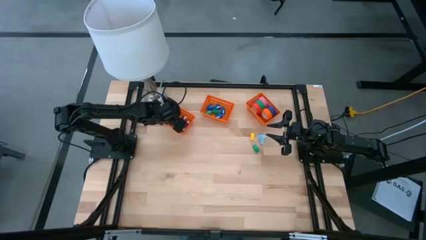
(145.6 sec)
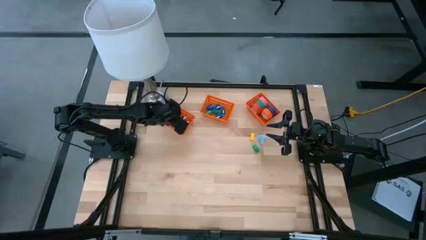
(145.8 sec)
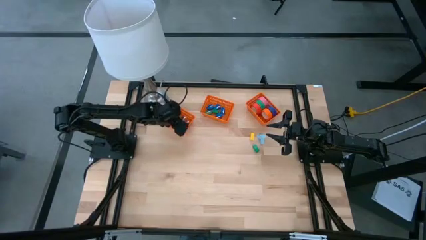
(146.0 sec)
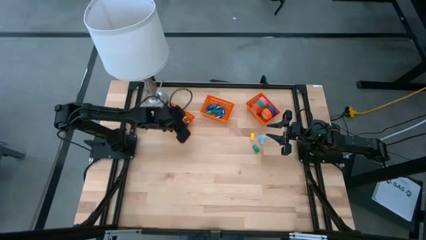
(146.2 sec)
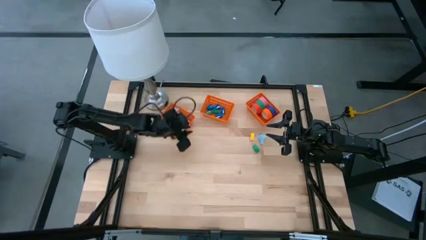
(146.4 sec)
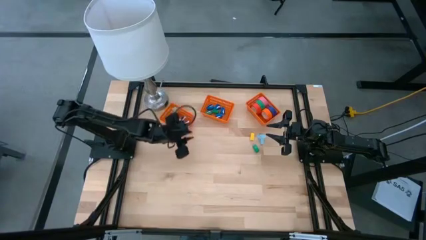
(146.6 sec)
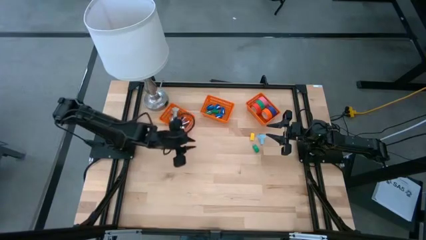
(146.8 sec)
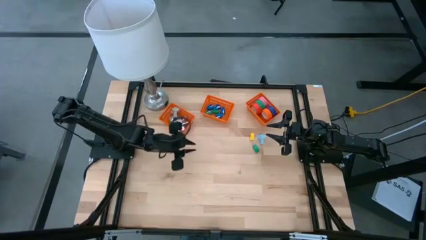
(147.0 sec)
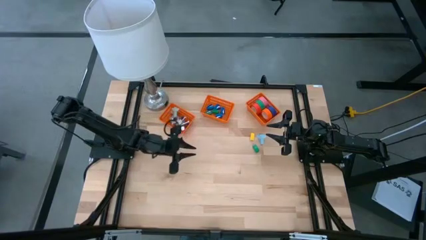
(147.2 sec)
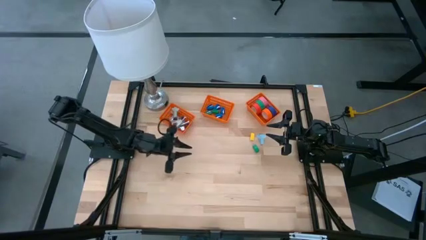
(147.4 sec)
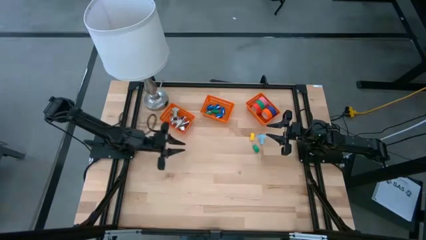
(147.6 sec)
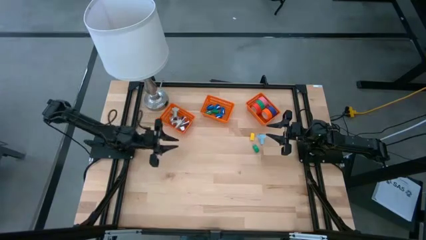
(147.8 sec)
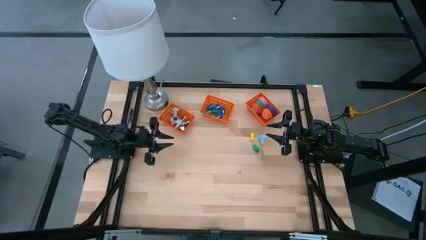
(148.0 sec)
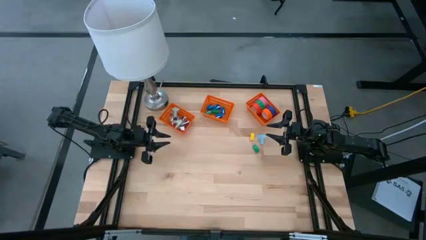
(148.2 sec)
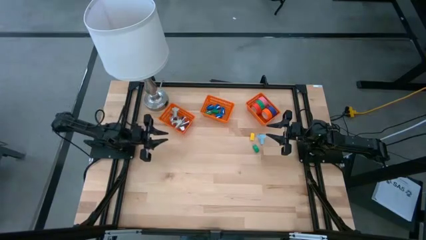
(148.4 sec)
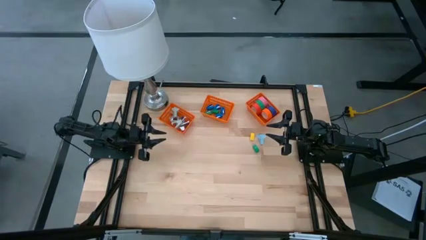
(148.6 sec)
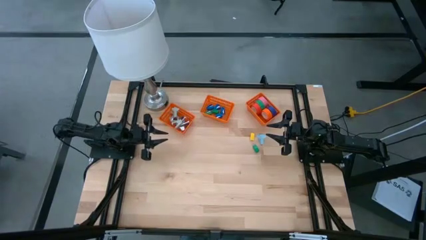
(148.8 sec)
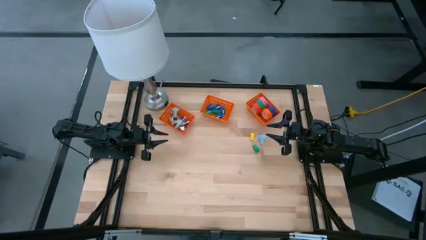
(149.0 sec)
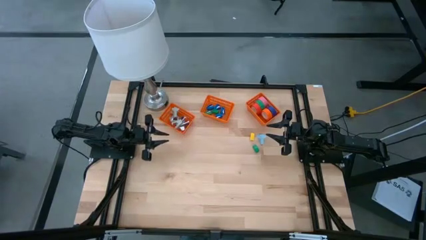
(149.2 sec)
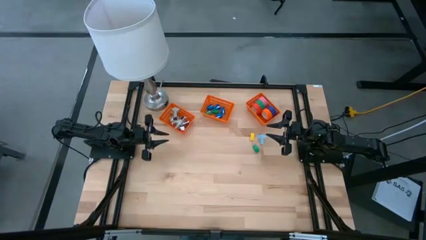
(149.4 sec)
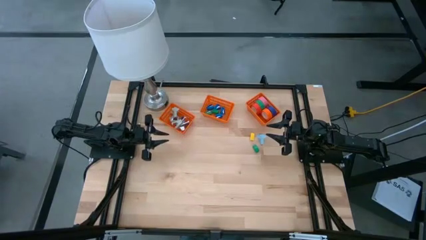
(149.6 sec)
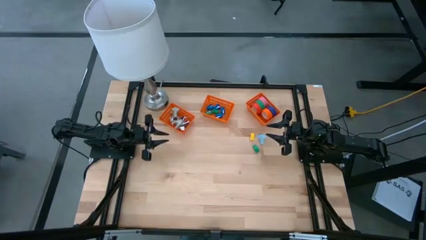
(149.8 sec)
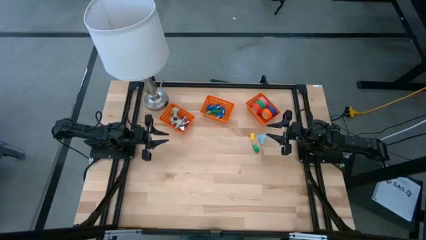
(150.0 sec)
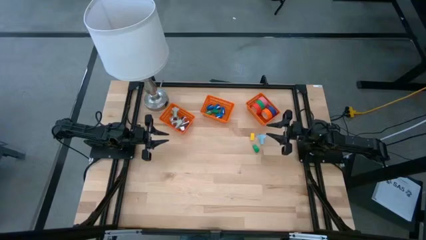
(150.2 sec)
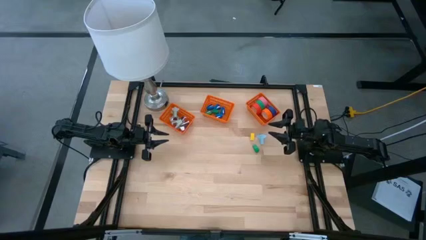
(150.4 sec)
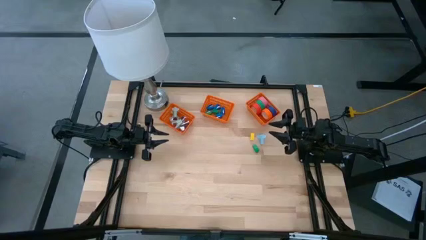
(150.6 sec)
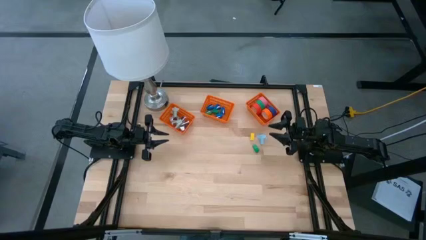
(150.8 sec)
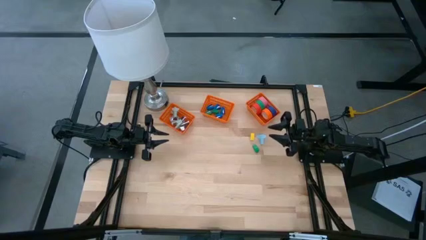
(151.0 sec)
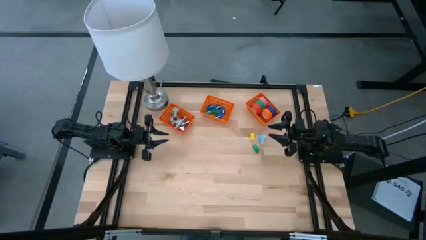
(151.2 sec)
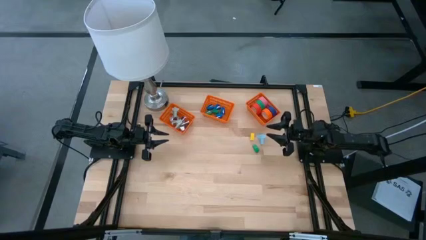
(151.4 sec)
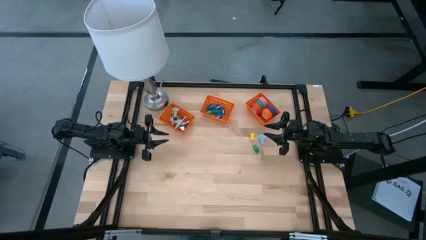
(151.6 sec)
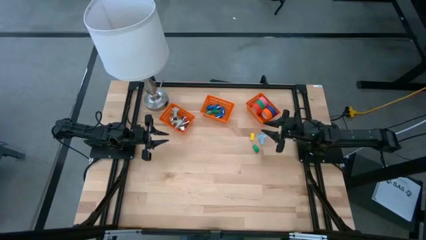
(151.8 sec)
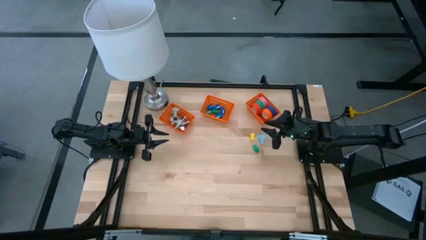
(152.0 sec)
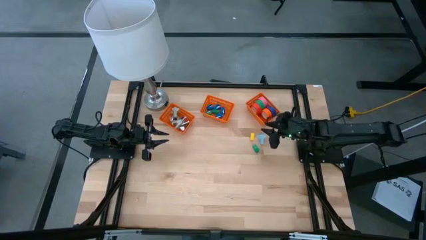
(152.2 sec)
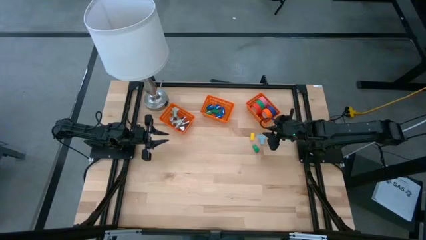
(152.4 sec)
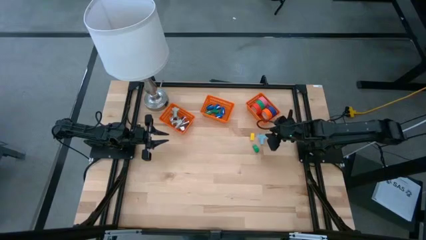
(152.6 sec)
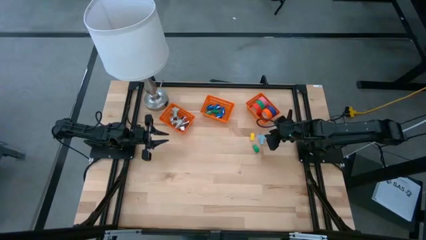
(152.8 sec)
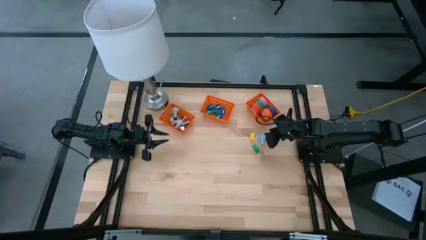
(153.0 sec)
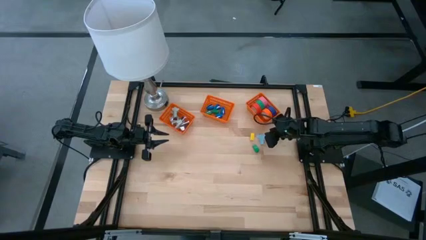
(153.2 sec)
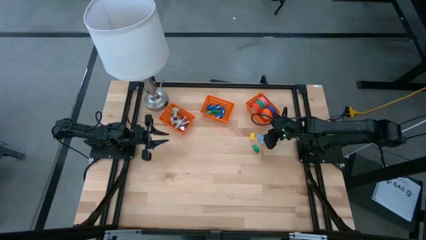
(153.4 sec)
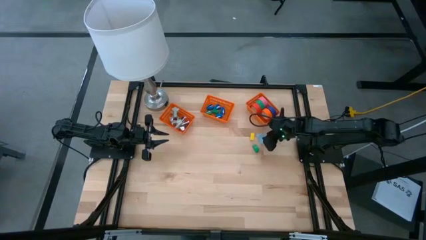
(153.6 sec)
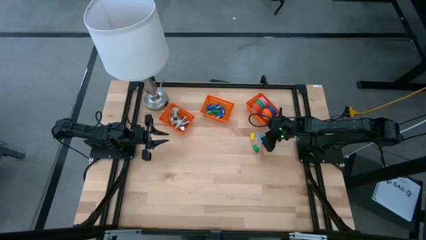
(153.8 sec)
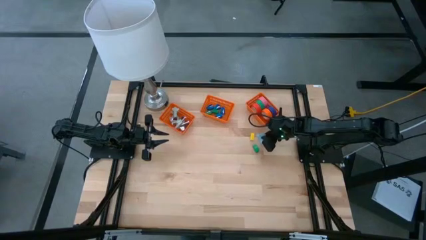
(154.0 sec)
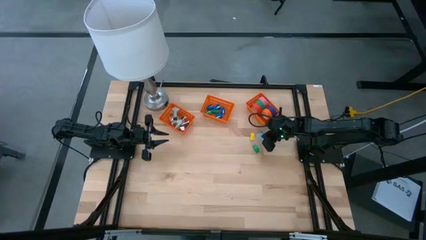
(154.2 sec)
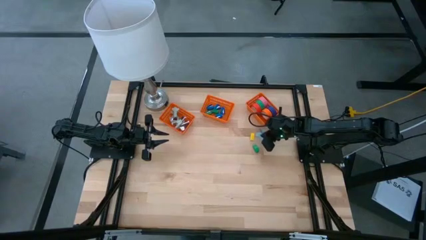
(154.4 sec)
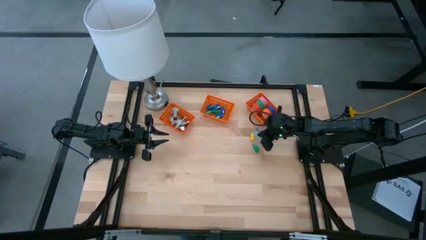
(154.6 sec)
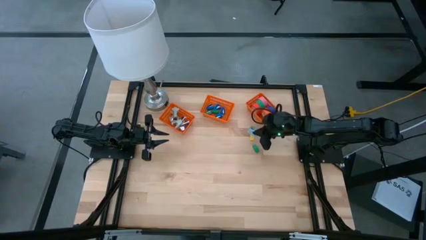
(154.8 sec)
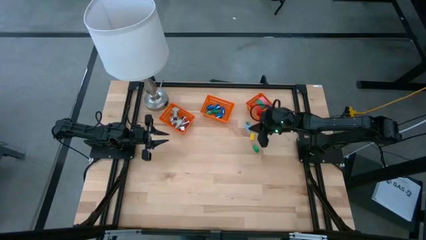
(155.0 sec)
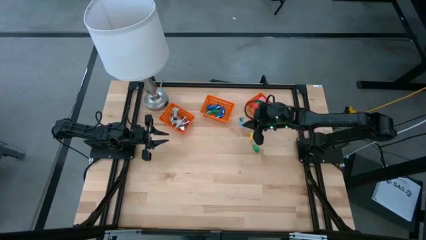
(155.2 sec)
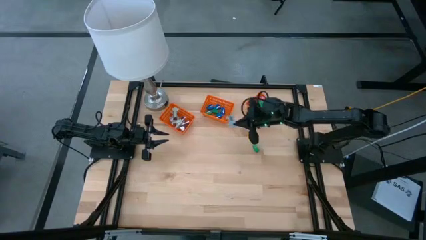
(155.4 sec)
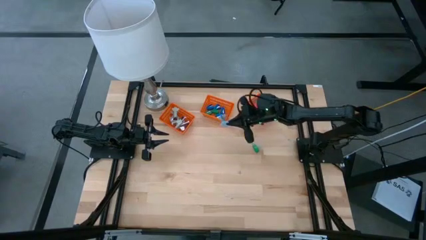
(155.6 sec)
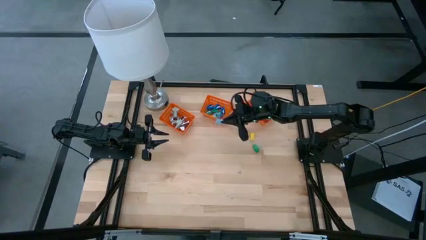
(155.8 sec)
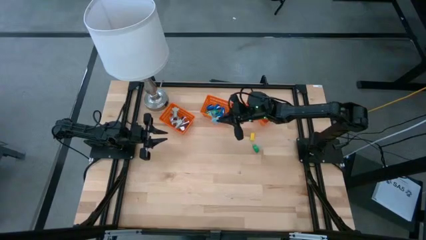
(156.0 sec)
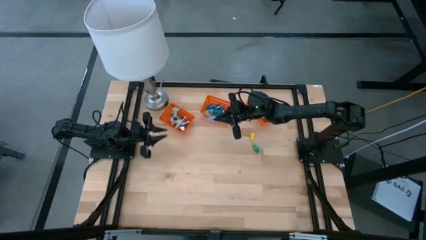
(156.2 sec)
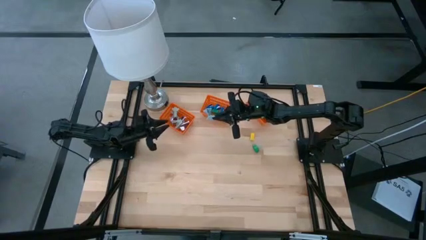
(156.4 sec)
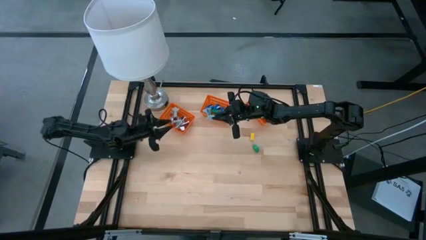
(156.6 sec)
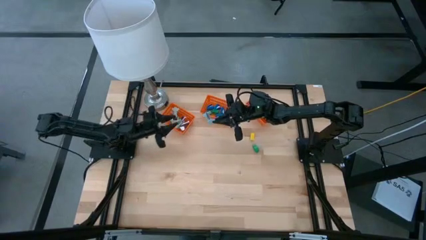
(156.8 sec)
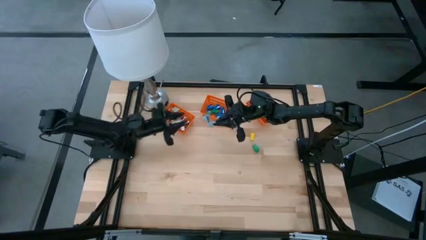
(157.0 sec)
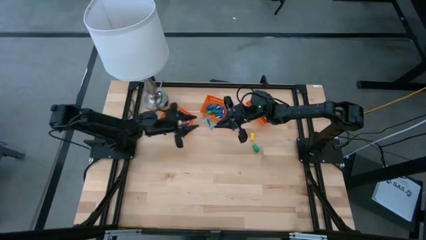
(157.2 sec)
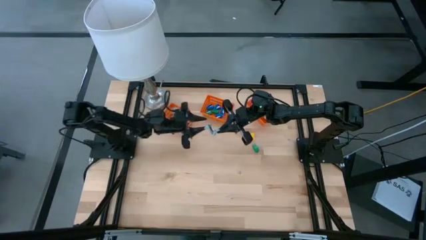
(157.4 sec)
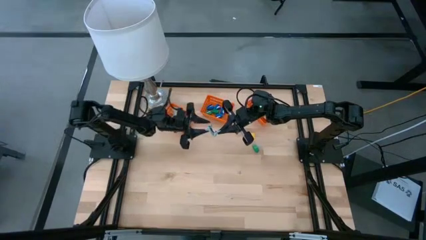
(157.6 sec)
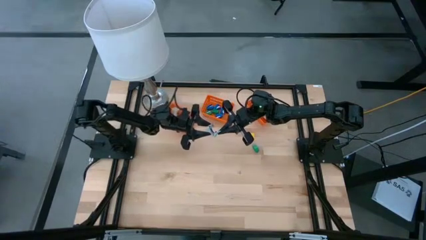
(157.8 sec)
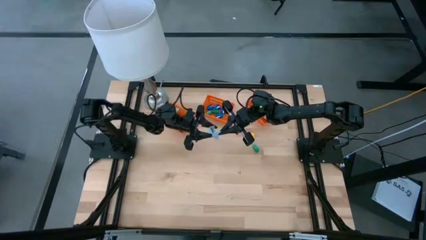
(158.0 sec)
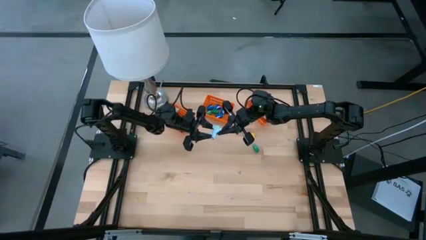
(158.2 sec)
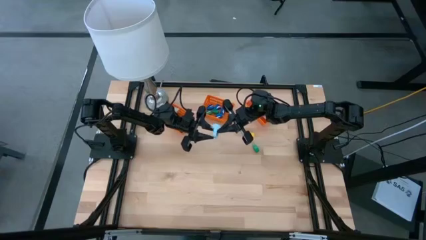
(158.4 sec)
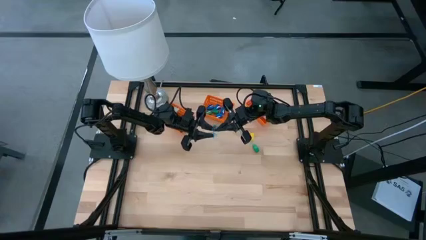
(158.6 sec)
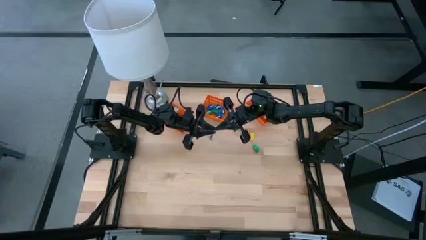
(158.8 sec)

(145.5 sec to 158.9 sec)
Task: Pick and place Stapler, Stapler remover, tape
Put the light blue staple remover into the left orange bin

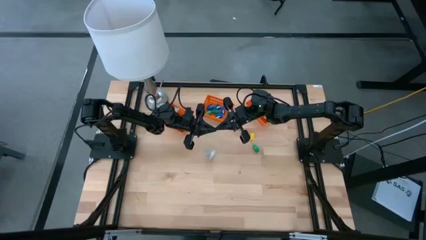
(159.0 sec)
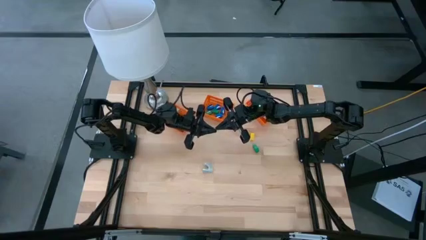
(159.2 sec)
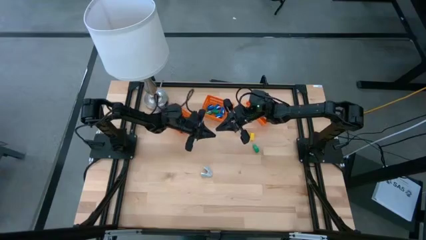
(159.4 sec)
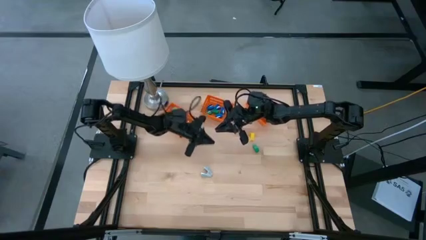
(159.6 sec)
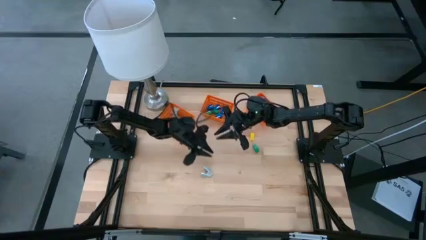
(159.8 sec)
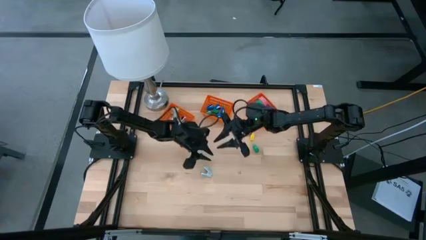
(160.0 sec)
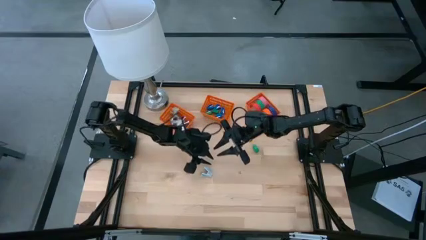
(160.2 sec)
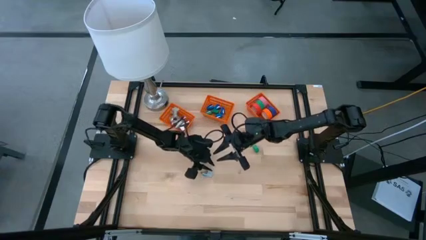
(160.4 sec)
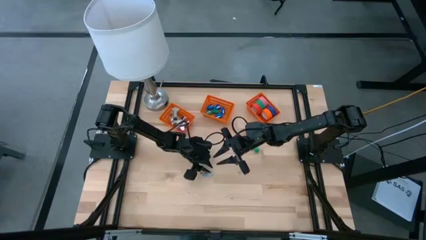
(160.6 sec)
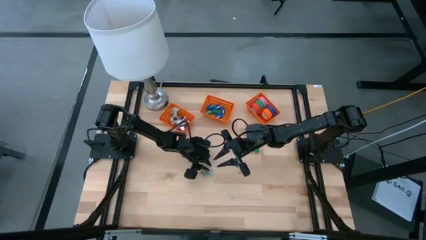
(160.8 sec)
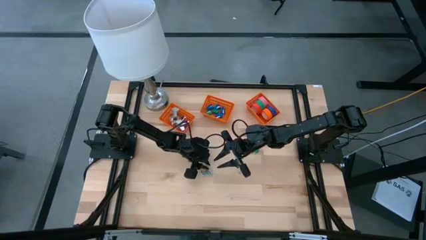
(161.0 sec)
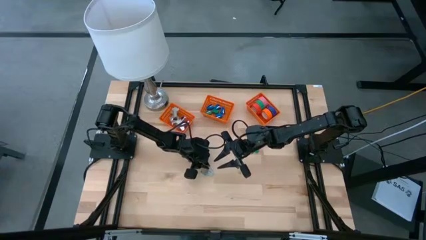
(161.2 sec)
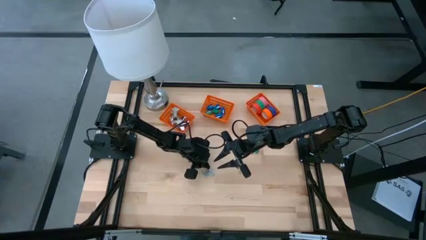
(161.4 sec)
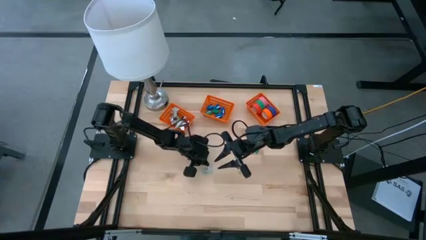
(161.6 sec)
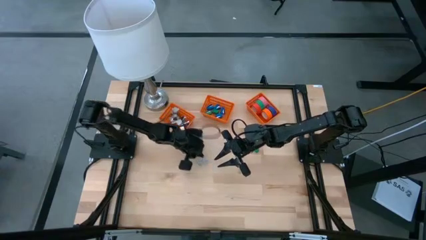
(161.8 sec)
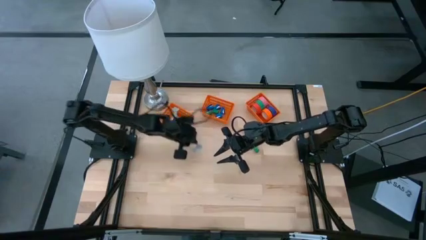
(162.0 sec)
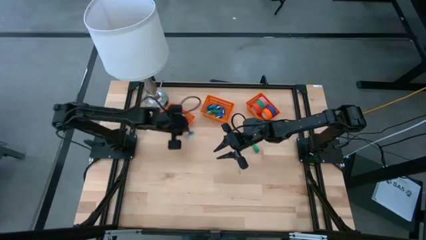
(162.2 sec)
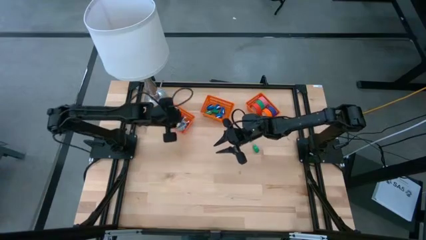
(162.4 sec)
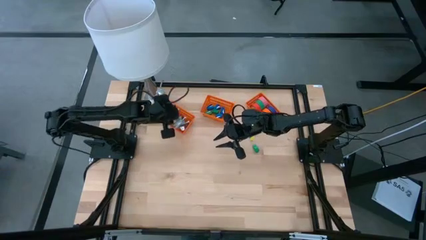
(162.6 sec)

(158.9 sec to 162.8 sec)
Put the light blue staple remover into the left orange bin
